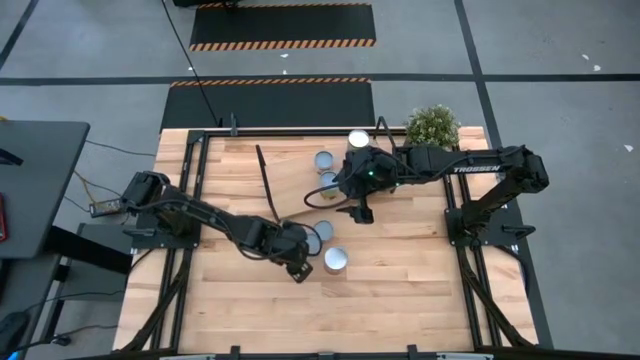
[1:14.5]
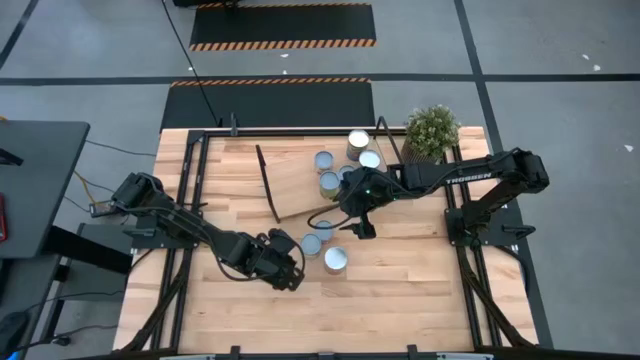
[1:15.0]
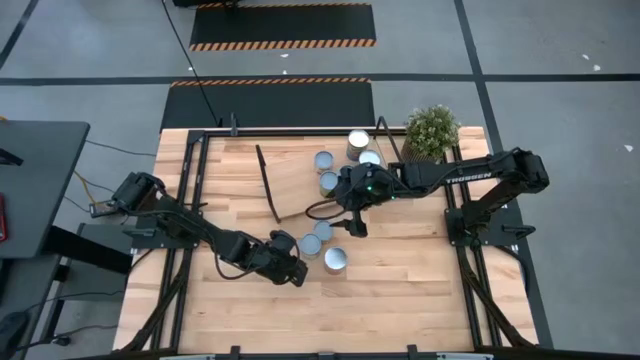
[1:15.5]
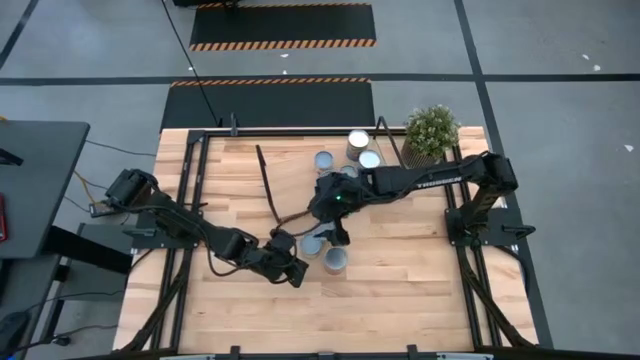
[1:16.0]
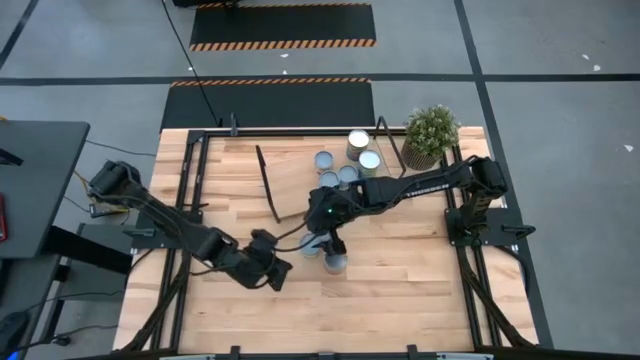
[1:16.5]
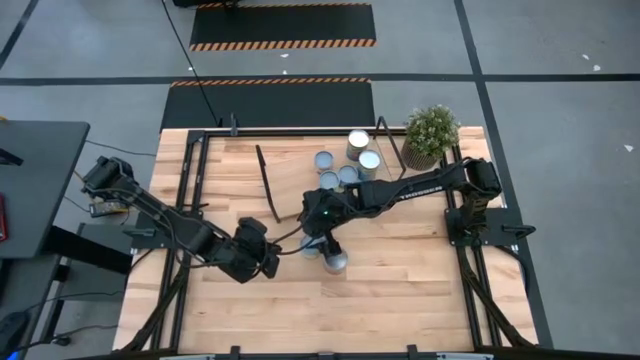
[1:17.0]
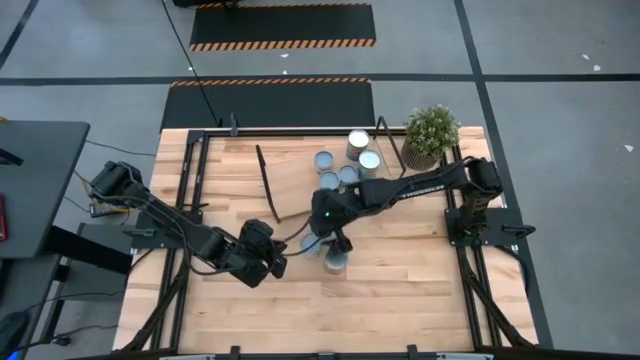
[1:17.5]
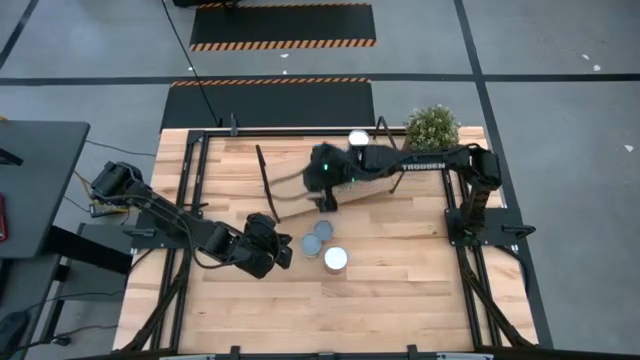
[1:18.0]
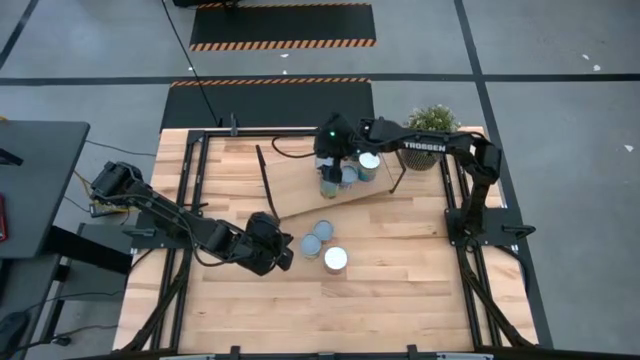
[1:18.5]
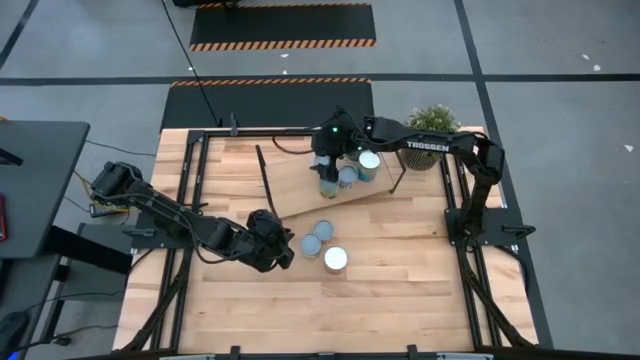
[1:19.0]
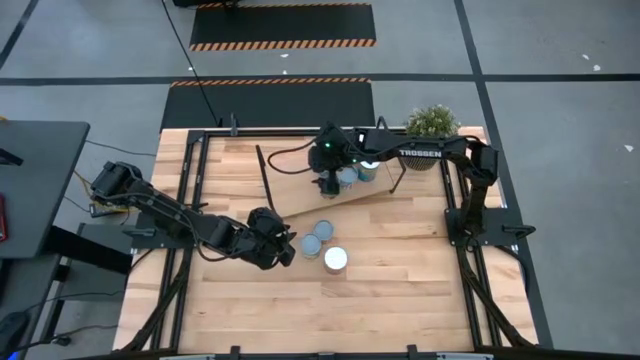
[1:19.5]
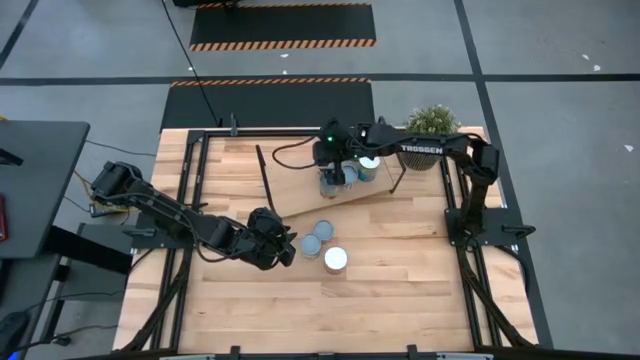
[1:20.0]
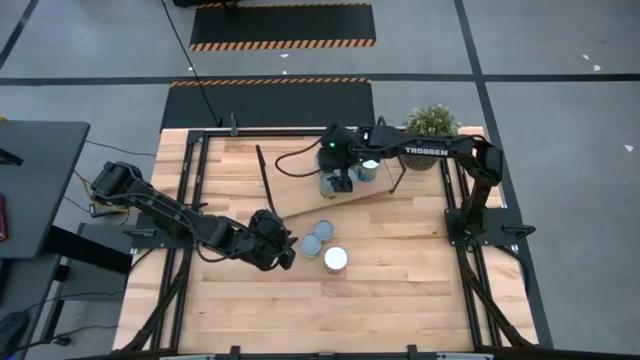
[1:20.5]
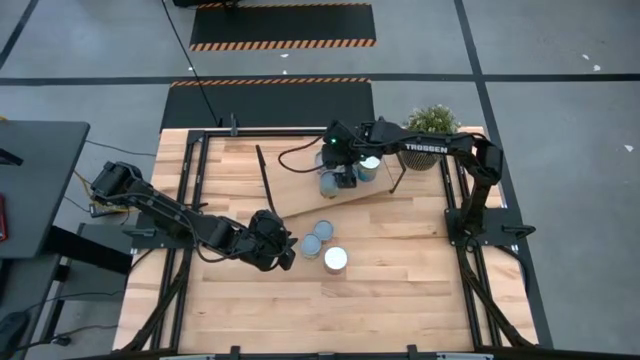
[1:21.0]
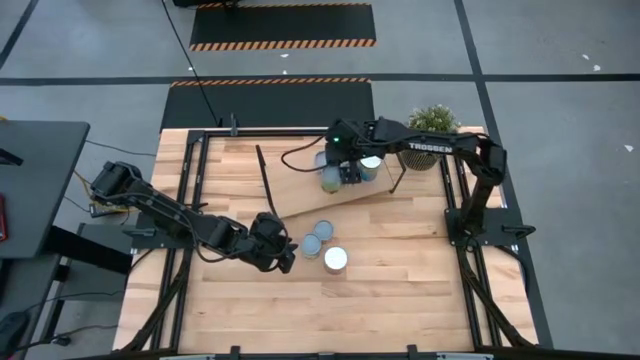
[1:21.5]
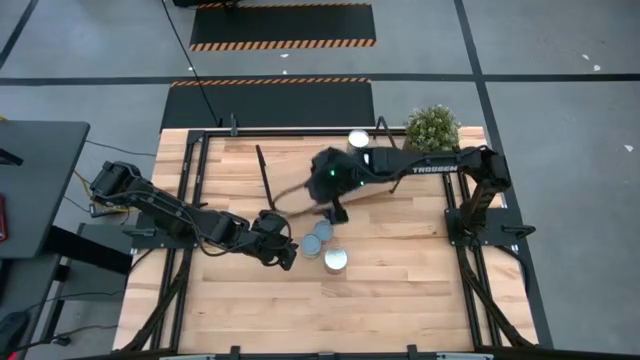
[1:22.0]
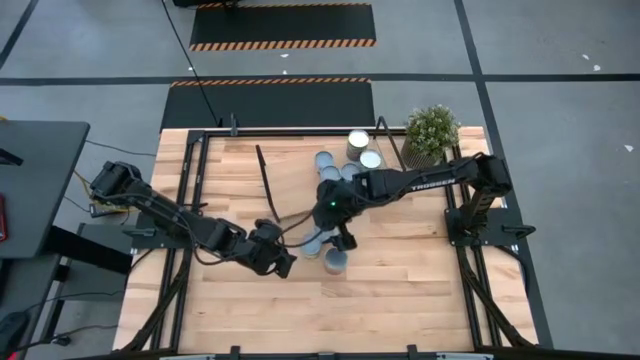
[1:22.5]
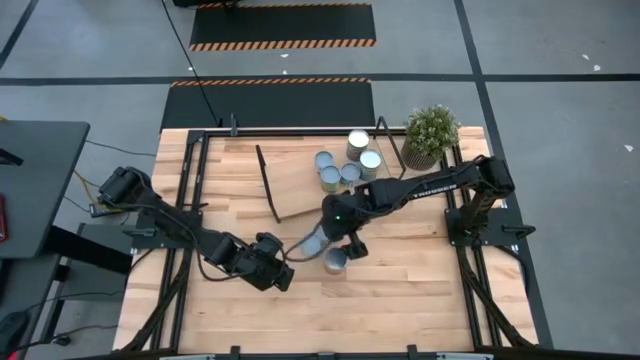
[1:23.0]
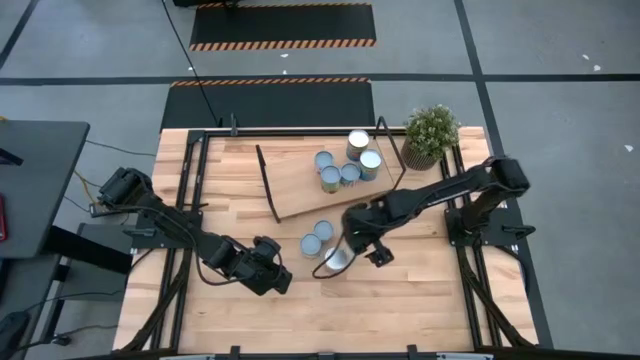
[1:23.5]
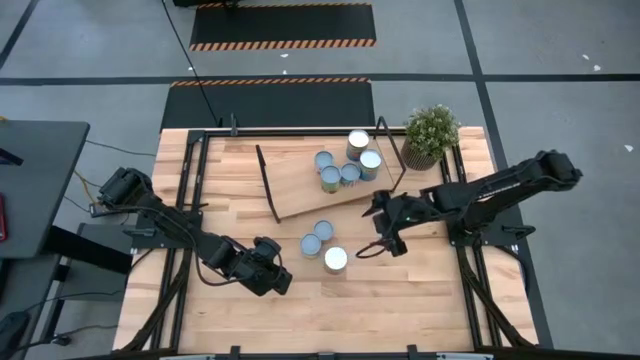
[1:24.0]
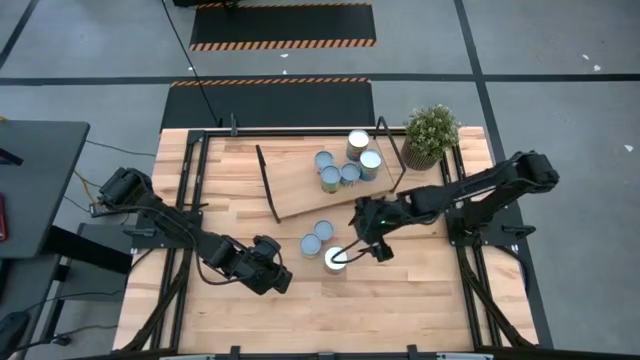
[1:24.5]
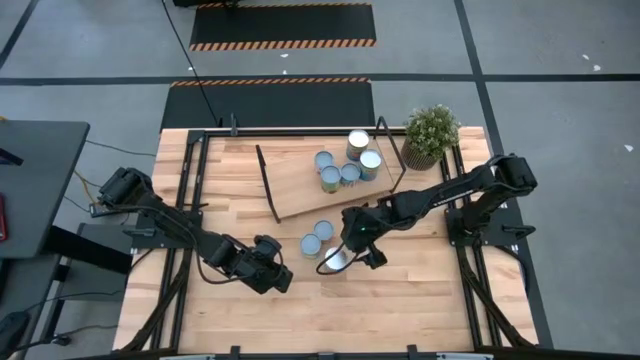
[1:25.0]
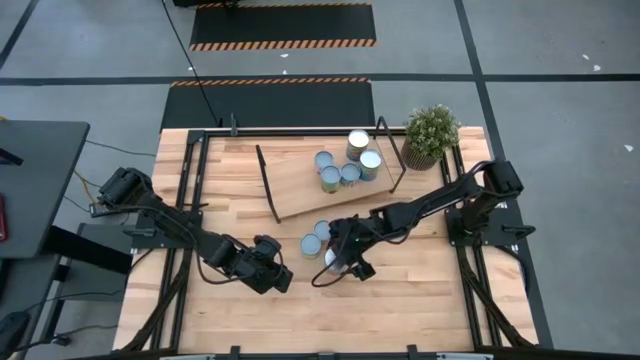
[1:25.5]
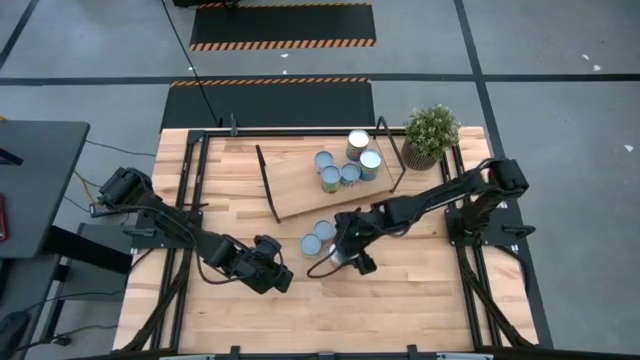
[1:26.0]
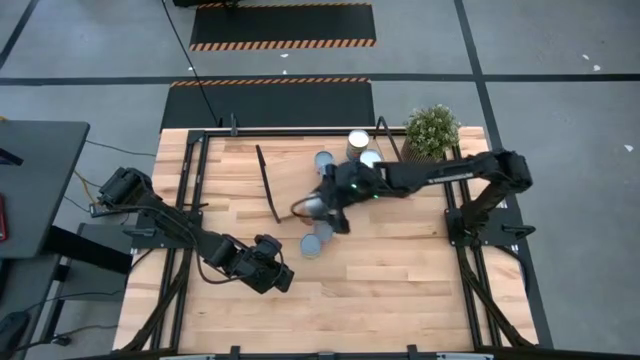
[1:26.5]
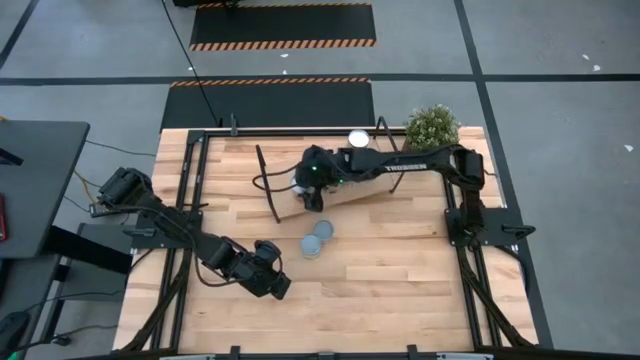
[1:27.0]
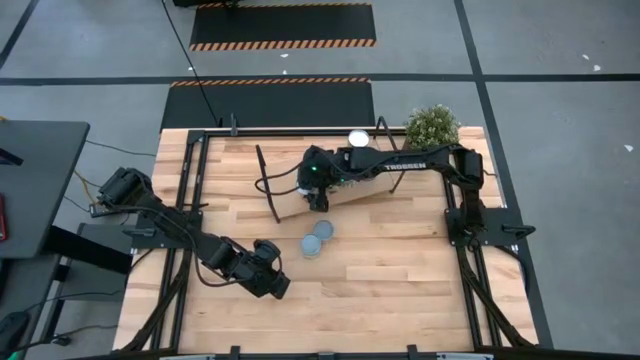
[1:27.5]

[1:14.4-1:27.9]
Task: Pick and place cans onto a shelf
Put the orange can on the shelf

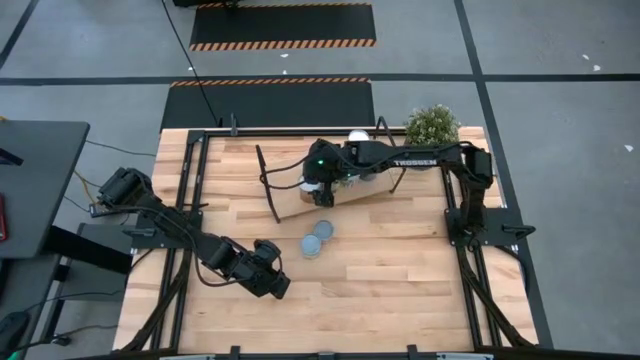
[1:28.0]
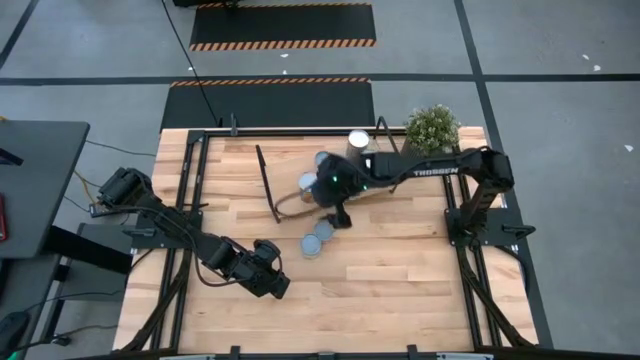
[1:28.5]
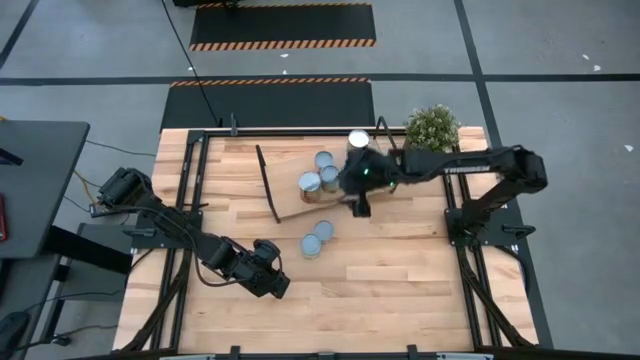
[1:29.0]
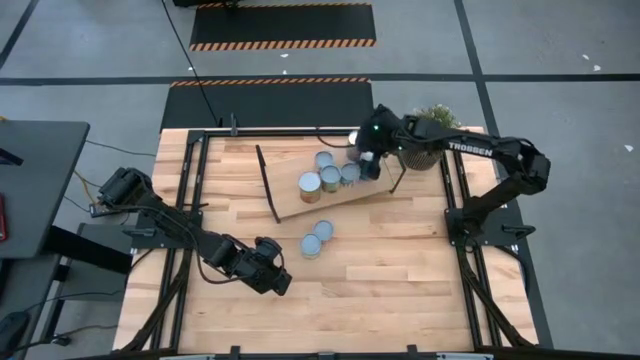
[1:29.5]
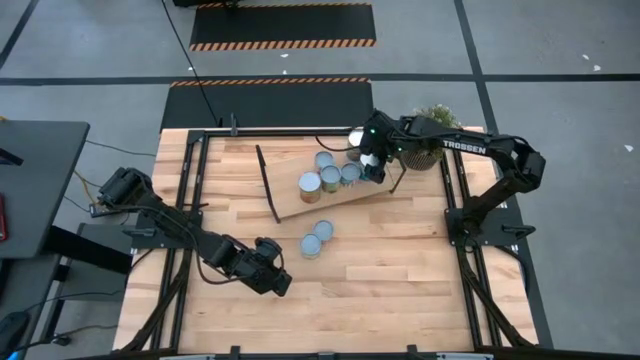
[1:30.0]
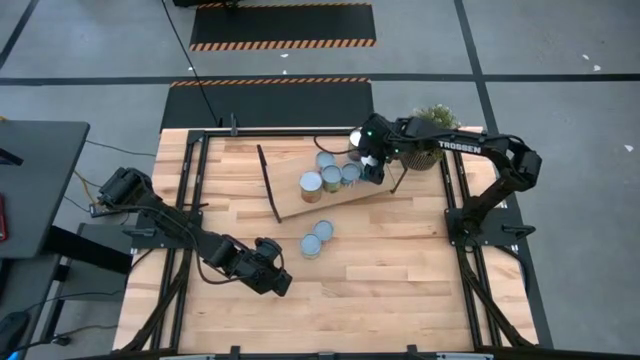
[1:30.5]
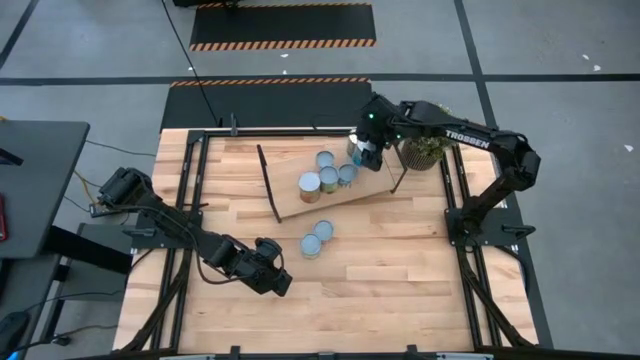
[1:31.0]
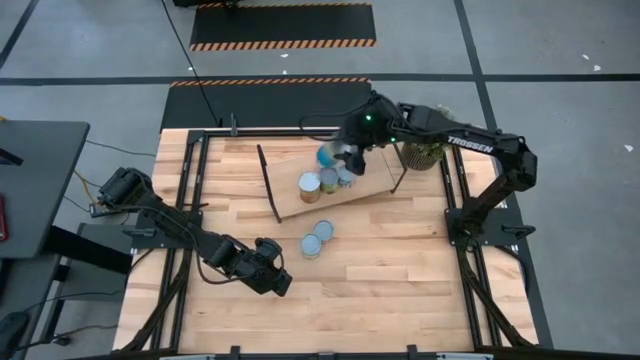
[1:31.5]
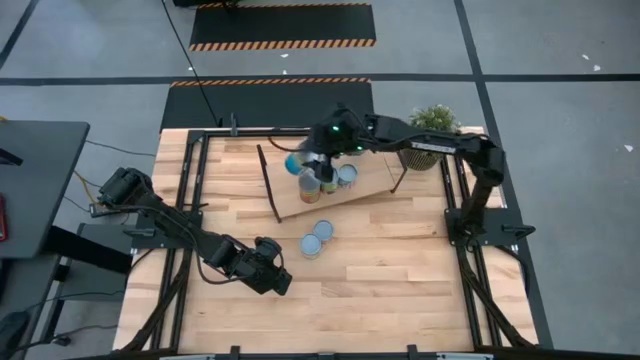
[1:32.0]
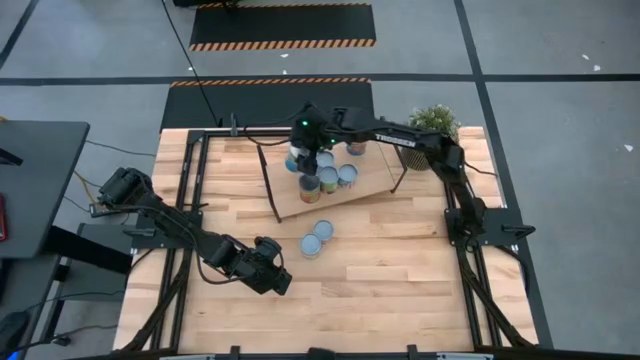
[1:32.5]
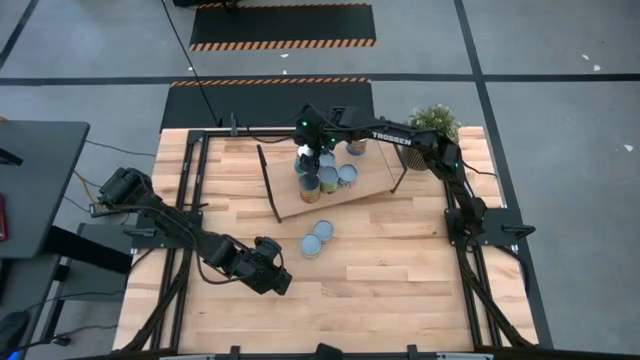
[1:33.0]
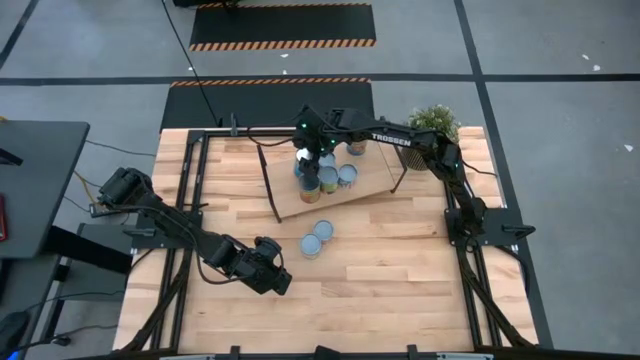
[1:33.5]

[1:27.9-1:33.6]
Put the blue can on the shelf

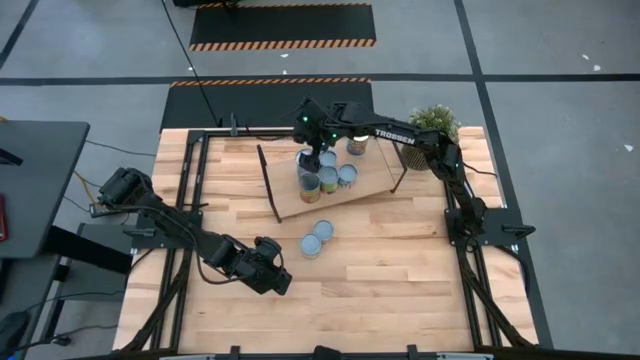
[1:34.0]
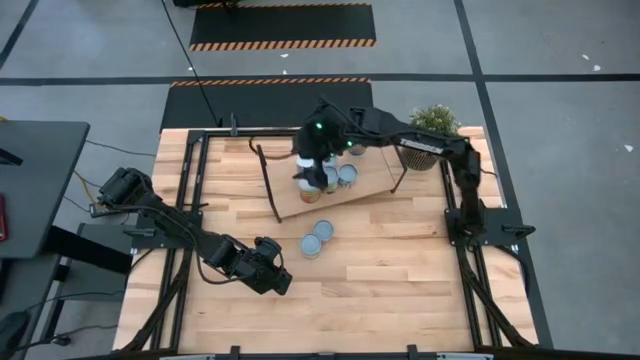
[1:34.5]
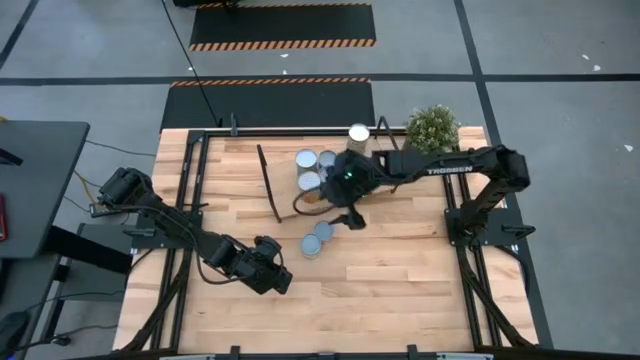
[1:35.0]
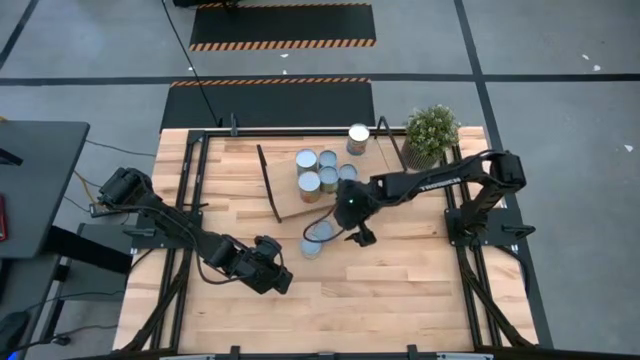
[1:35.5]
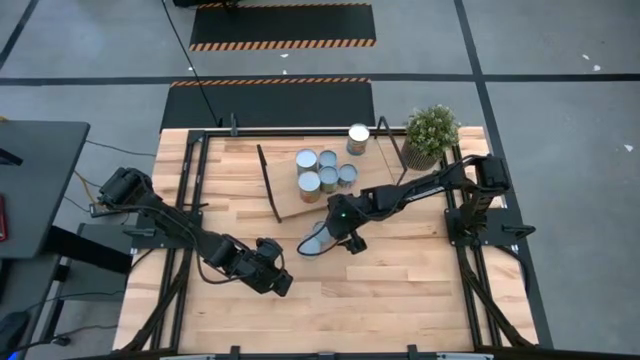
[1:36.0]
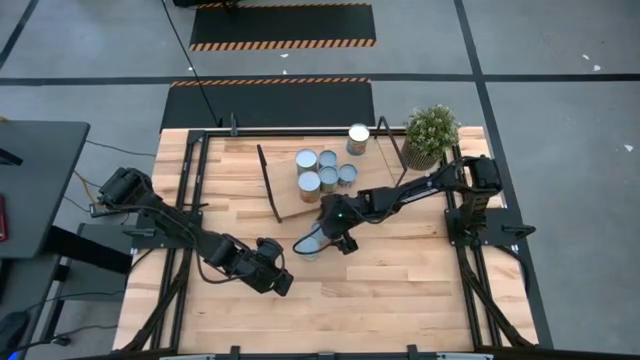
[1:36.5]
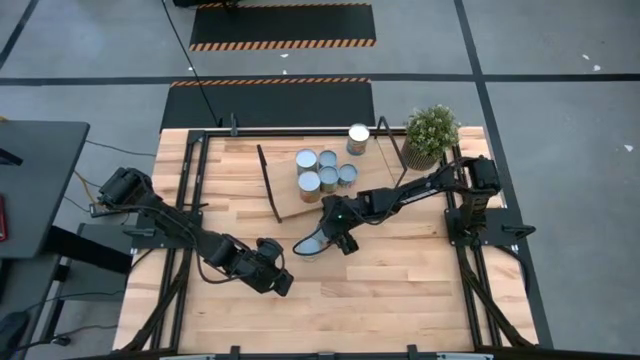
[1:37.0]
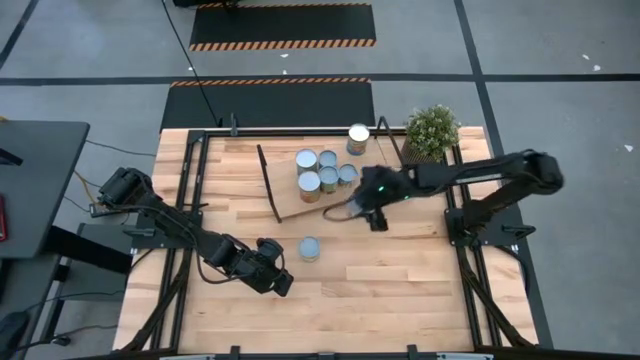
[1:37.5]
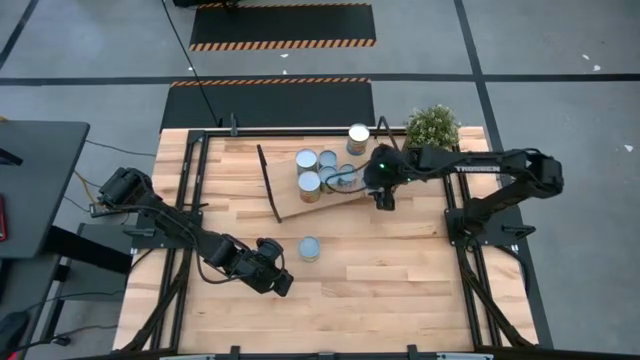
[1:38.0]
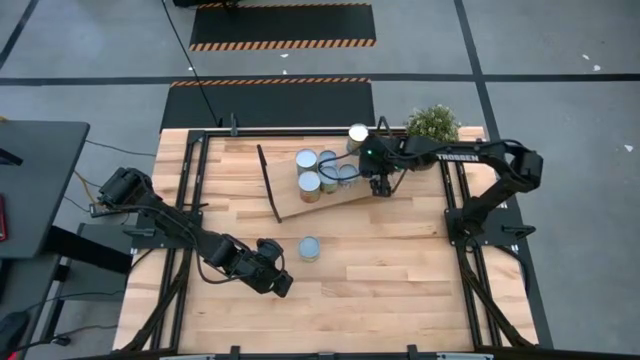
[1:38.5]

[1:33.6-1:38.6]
Put the light red can on the shelf
